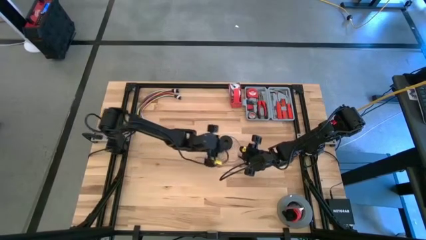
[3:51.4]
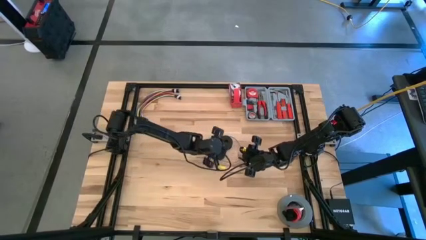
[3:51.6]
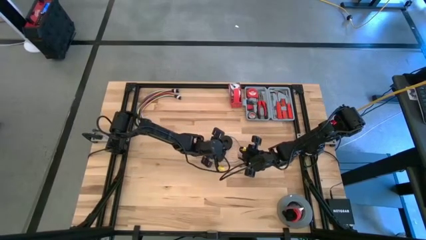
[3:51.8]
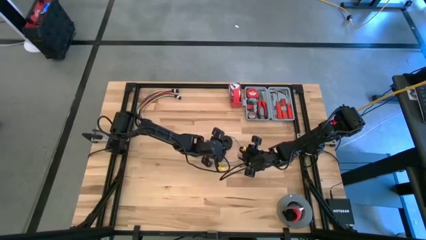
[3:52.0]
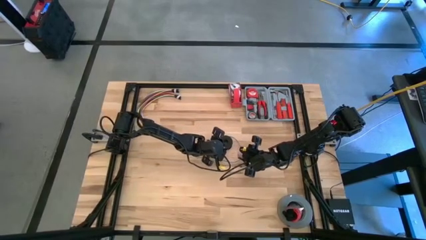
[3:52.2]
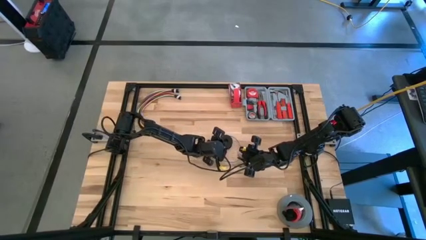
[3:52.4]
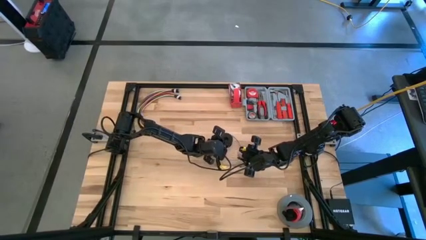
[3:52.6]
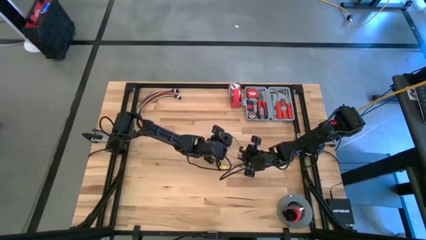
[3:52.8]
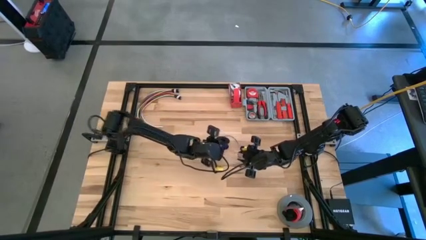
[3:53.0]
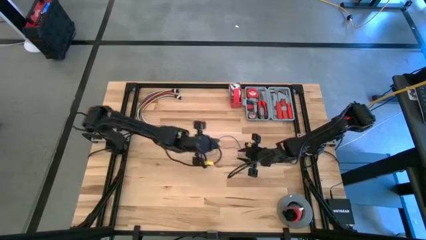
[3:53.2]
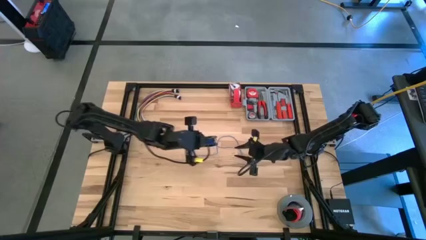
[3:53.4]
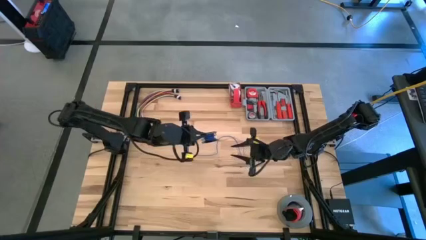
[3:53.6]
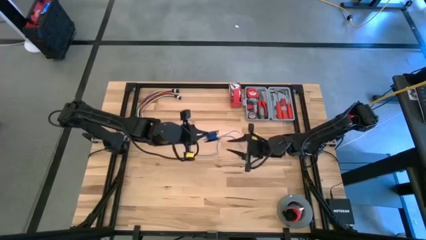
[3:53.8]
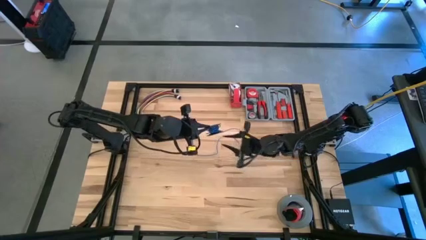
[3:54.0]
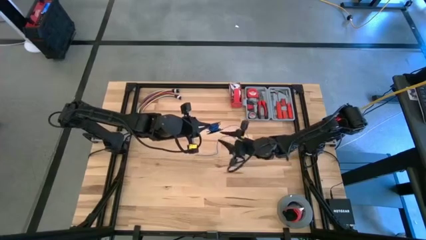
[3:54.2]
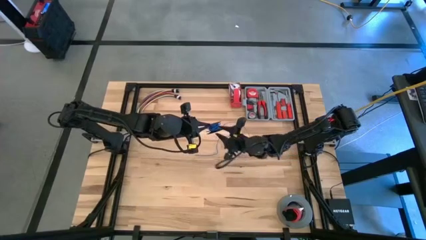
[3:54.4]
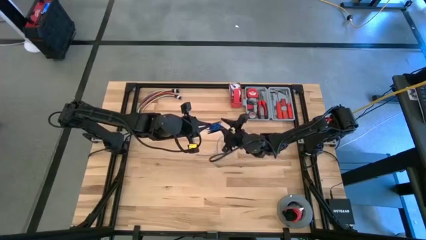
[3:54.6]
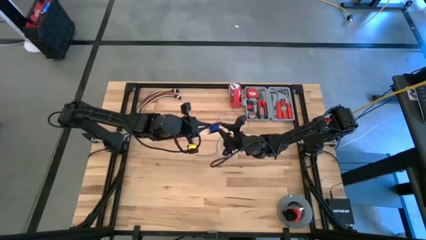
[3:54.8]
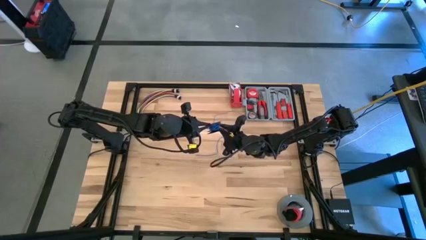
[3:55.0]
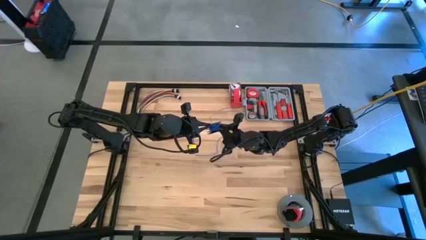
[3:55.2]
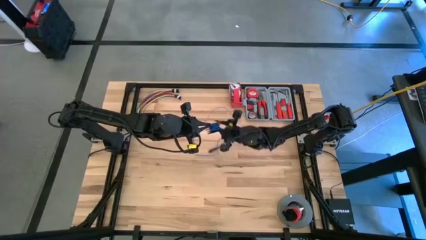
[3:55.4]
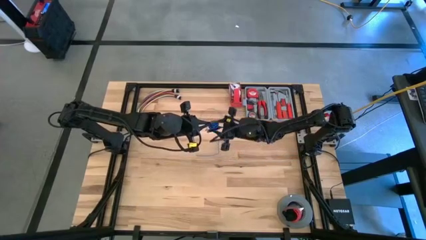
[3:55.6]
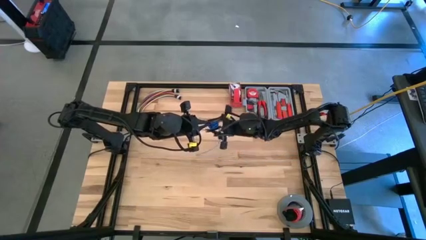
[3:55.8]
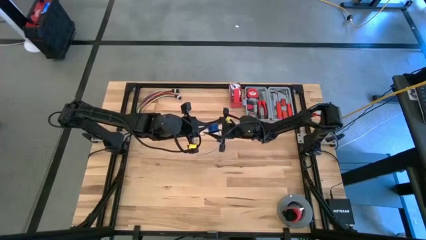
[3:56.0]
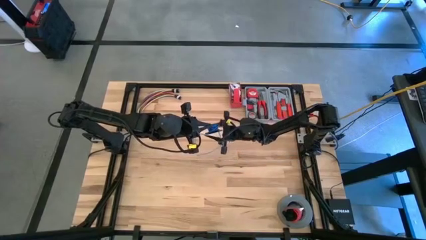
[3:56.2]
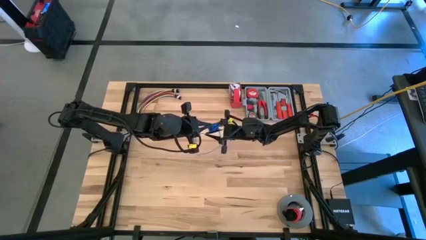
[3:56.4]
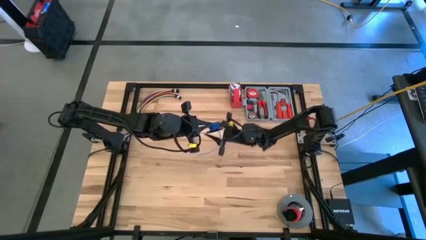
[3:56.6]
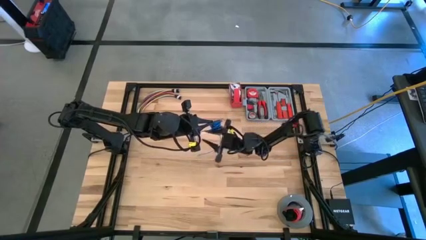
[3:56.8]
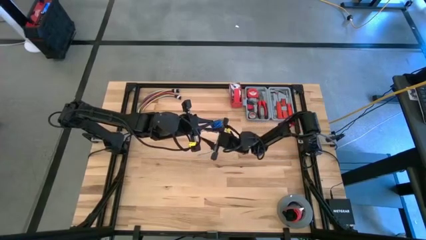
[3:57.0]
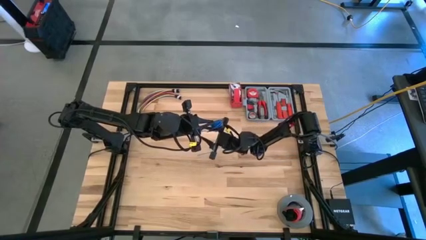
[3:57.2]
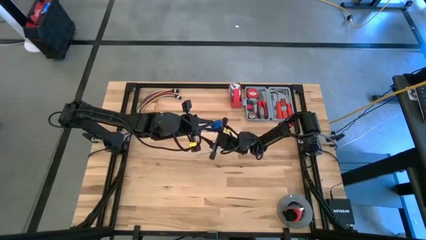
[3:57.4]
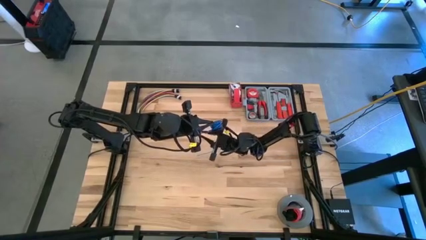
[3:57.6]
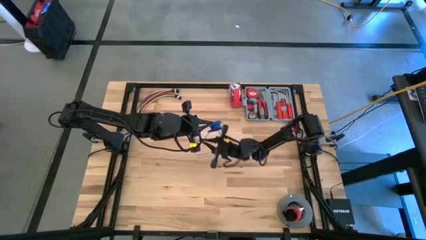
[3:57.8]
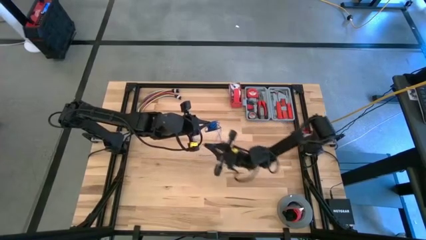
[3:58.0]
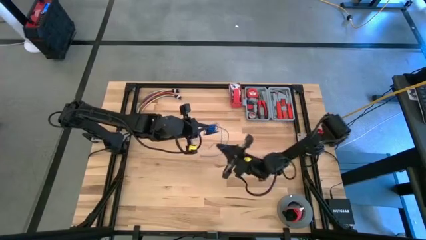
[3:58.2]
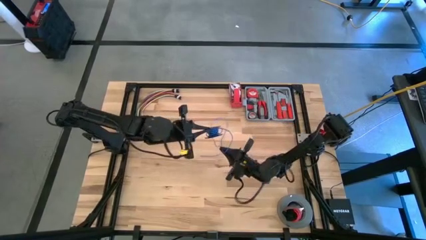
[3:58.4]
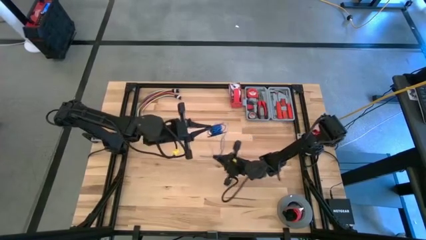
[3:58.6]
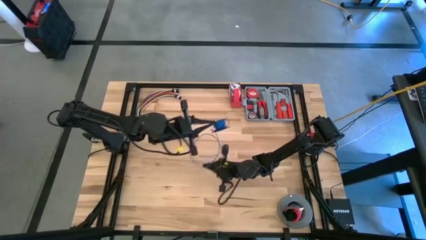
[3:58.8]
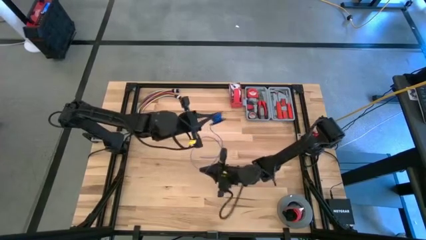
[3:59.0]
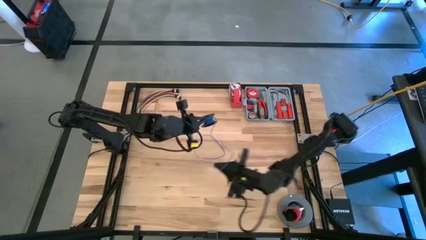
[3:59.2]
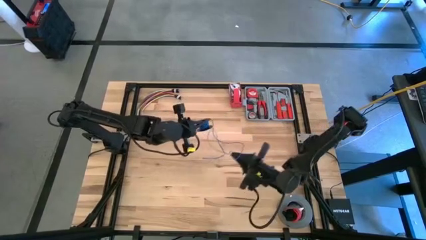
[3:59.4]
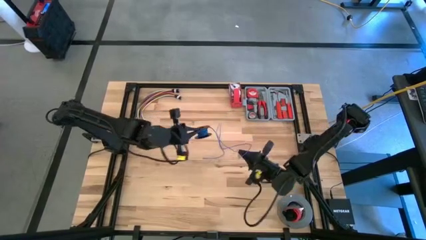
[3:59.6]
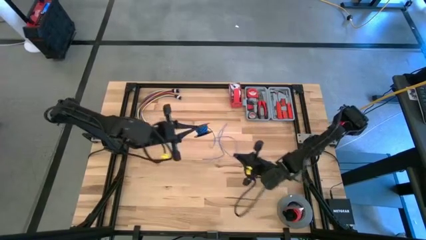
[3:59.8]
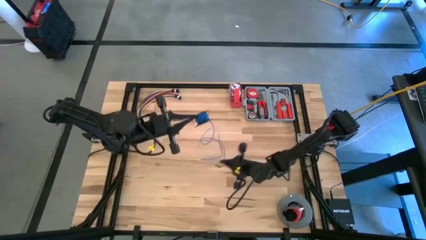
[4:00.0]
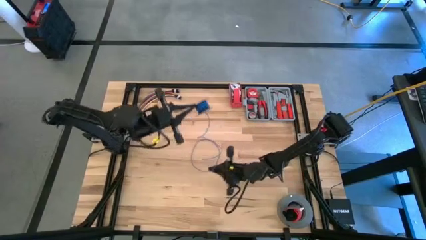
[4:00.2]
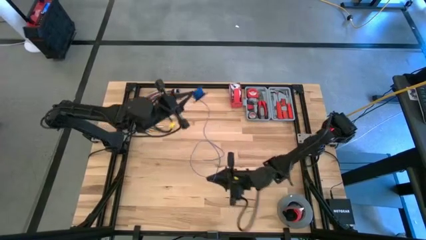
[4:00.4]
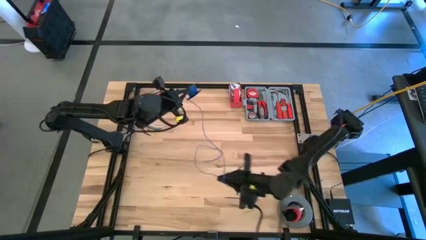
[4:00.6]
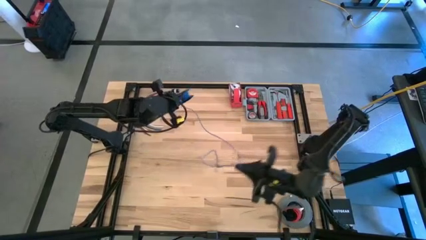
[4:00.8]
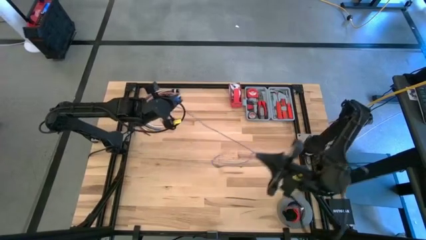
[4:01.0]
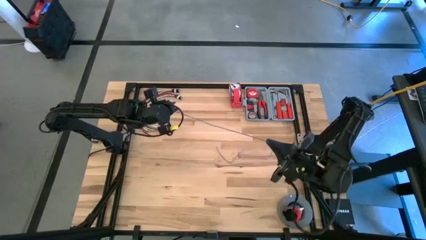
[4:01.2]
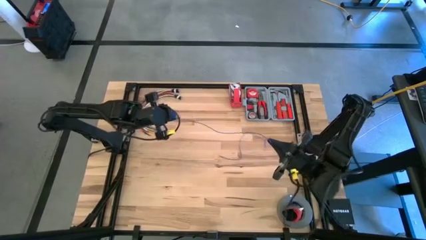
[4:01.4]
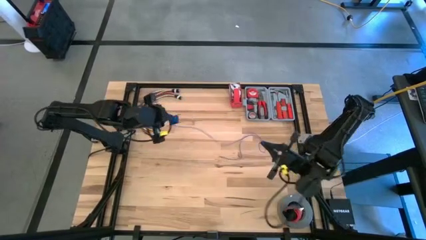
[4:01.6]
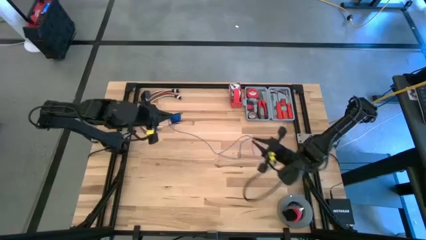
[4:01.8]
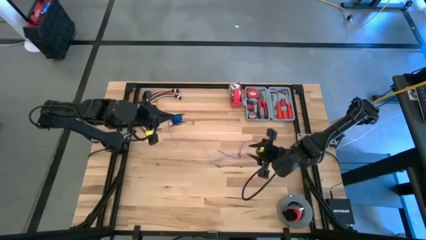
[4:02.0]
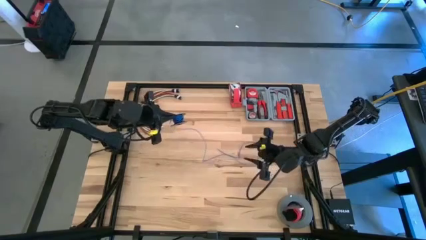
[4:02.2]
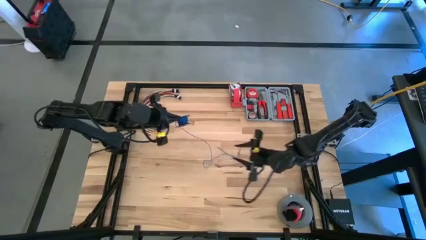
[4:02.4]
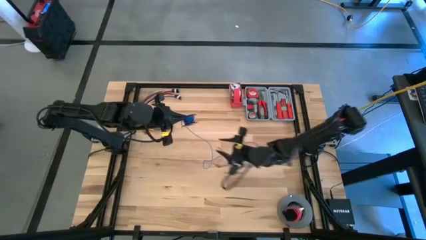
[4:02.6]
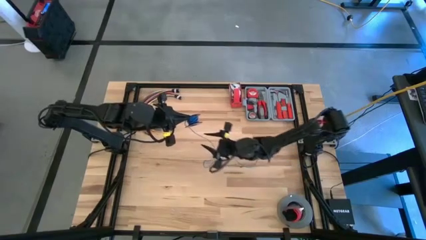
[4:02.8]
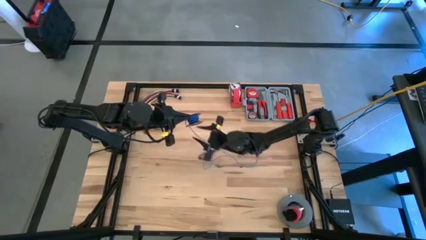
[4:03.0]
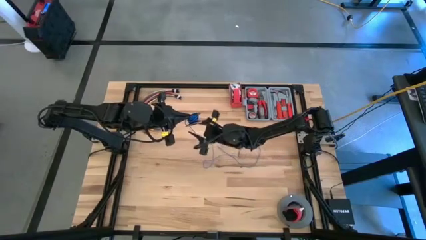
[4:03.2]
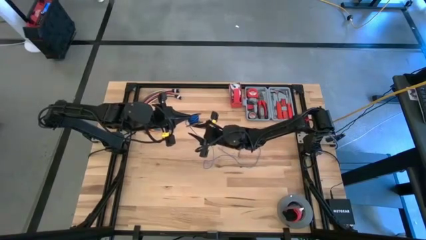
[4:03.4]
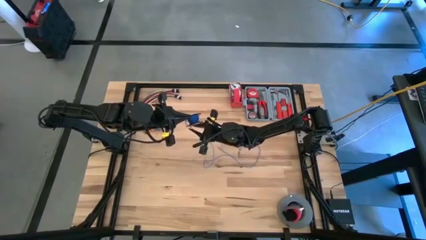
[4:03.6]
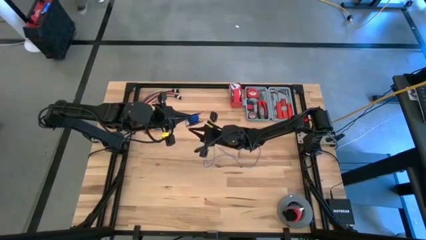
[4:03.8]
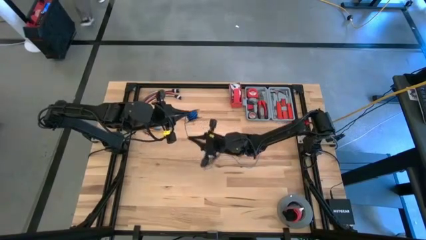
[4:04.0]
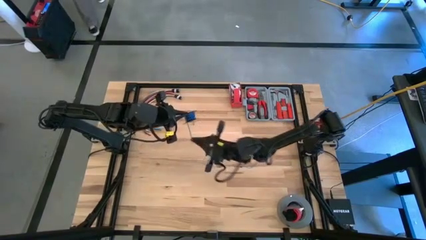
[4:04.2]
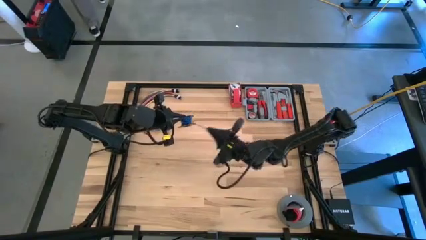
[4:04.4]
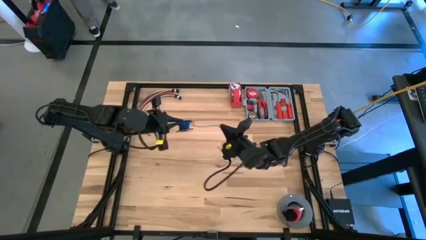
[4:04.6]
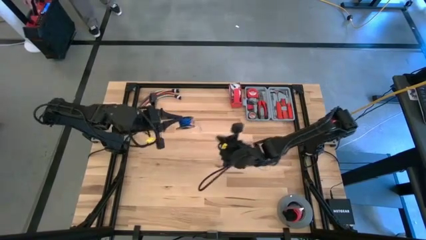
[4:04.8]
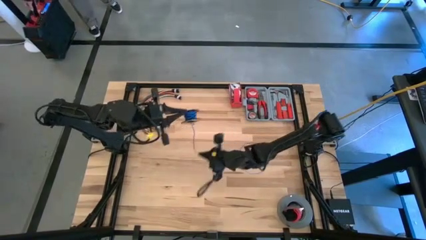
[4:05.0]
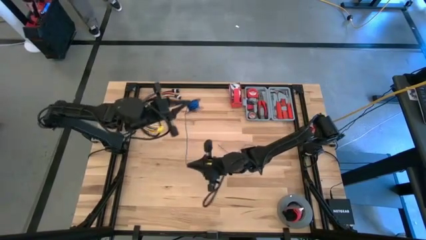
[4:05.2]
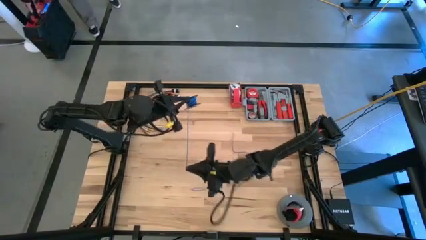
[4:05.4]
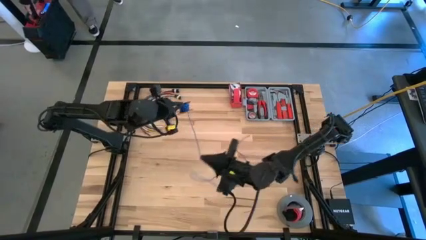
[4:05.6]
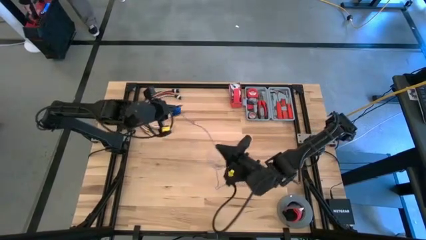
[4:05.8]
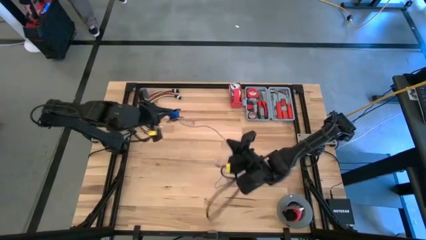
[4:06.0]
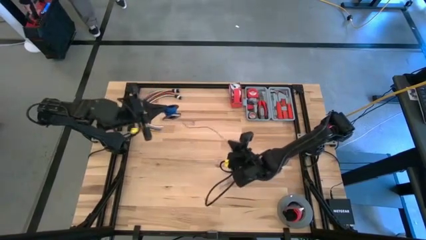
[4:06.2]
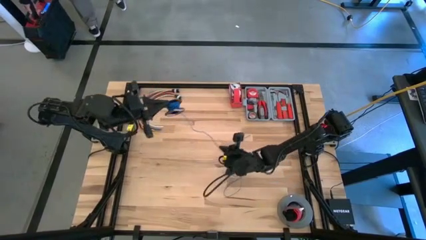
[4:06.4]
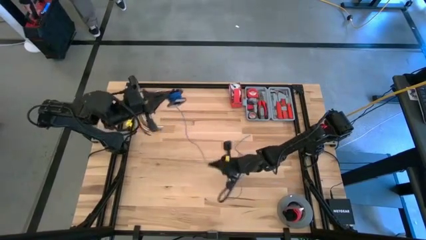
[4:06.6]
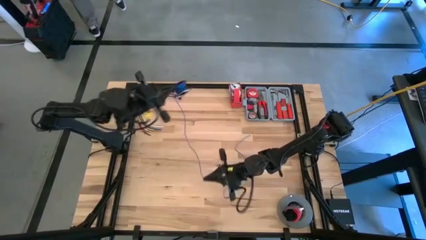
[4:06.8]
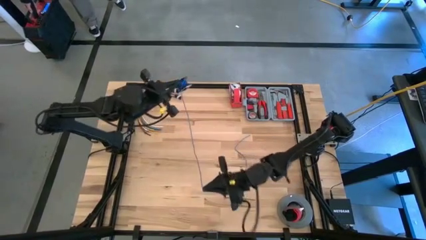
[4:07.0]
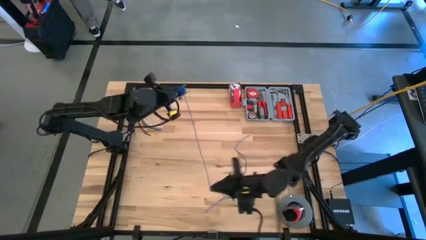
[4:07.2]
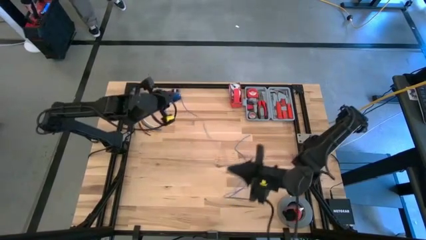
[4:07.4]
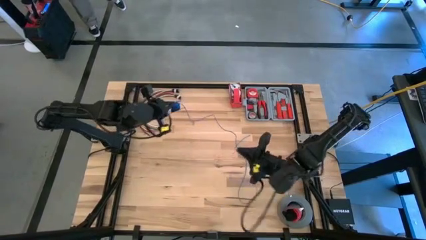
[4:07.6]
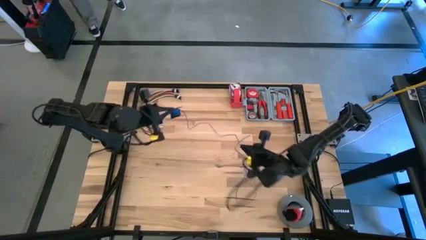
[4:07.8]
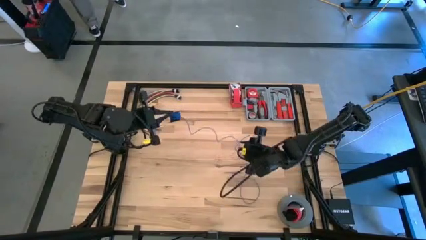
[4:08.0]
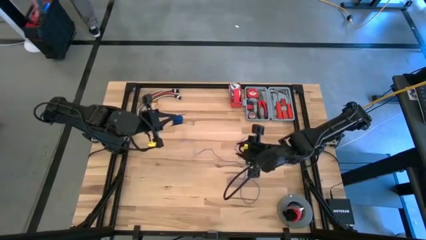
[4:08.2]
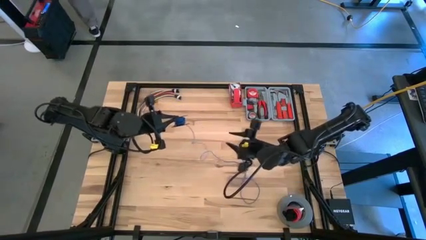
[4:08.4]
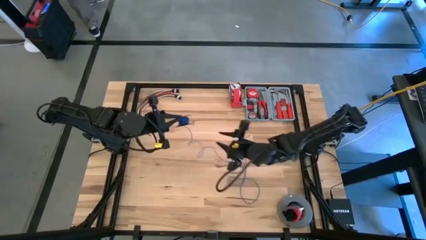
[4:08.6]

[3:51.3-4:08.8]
Task: Coil cords
Uncoil the blue wire from the black spool
